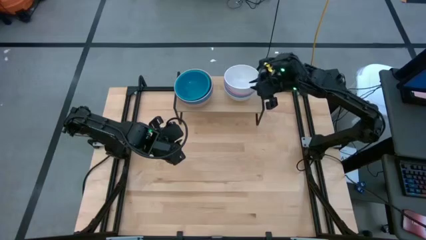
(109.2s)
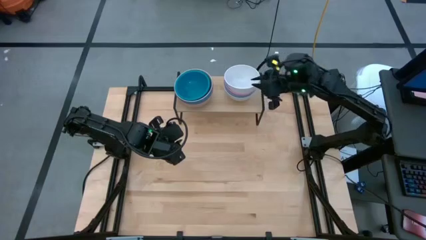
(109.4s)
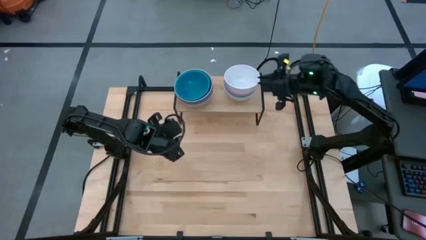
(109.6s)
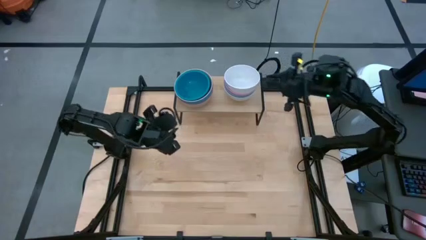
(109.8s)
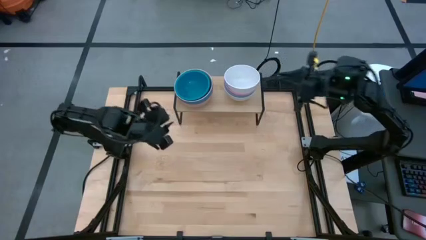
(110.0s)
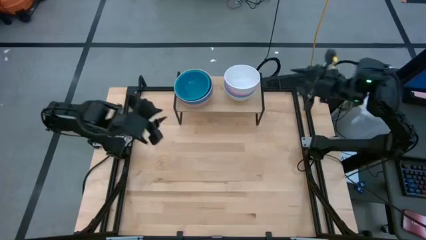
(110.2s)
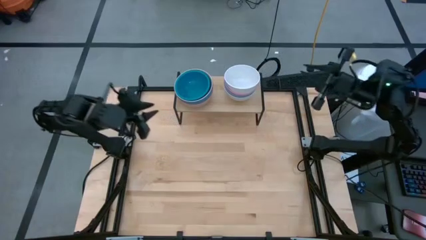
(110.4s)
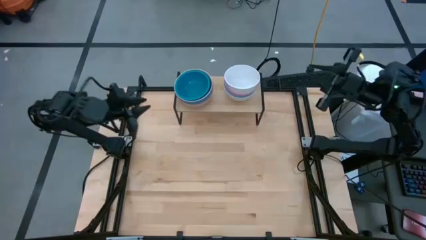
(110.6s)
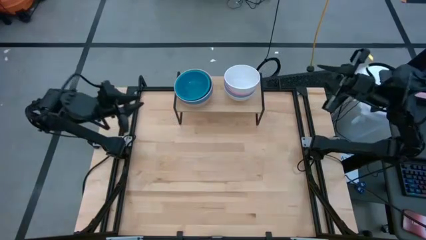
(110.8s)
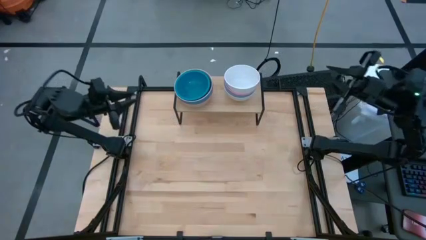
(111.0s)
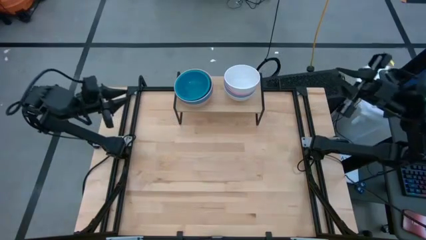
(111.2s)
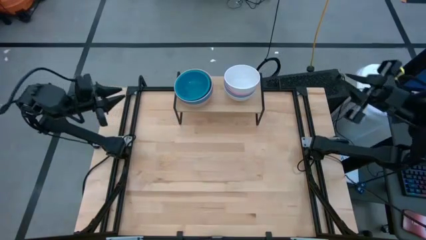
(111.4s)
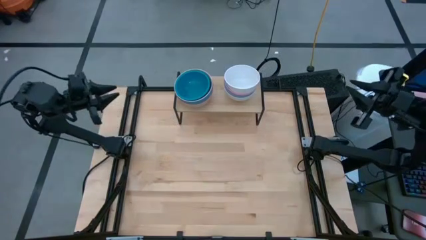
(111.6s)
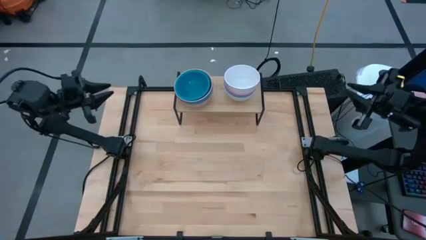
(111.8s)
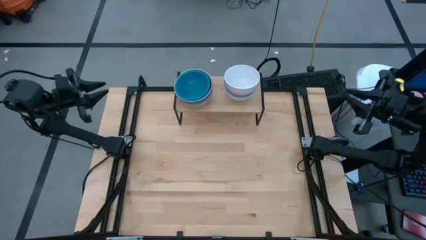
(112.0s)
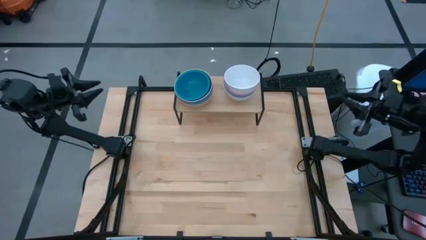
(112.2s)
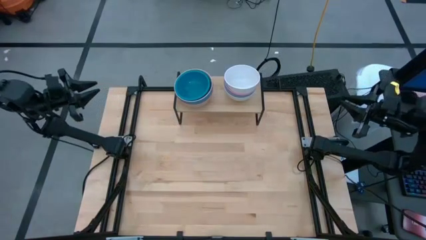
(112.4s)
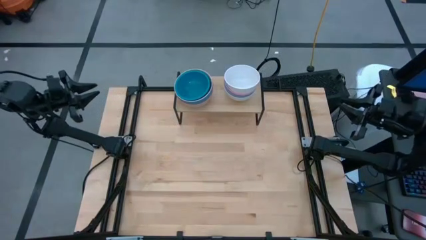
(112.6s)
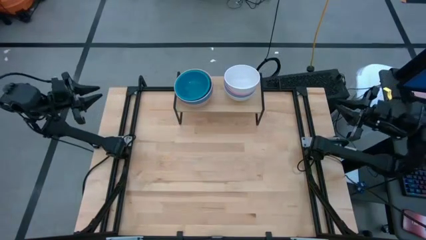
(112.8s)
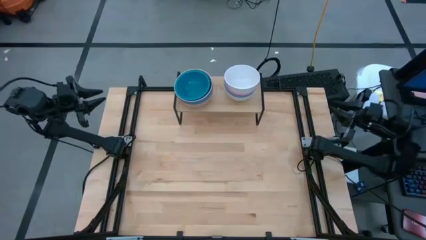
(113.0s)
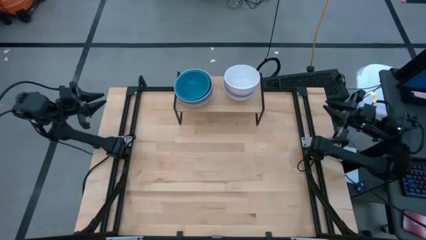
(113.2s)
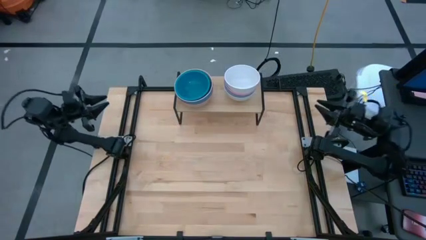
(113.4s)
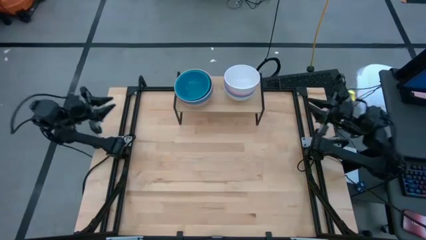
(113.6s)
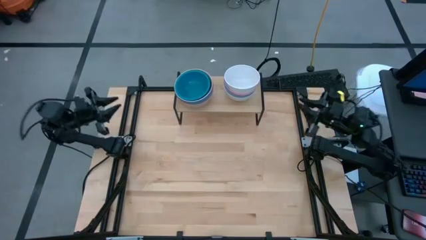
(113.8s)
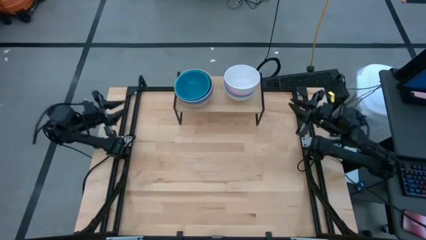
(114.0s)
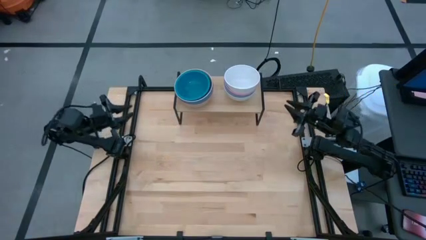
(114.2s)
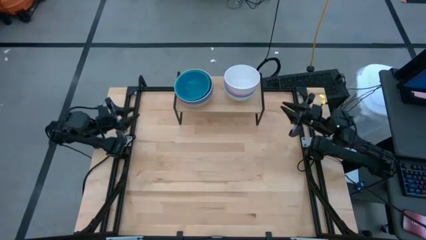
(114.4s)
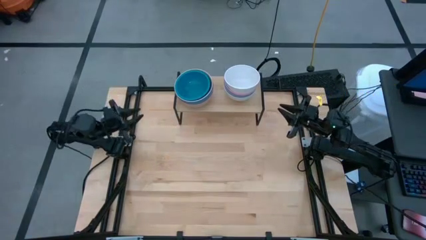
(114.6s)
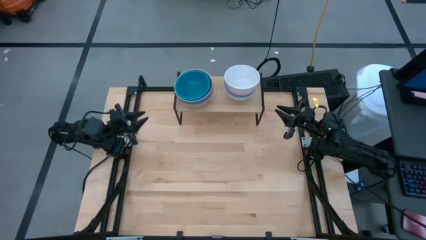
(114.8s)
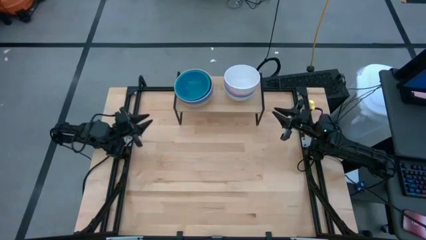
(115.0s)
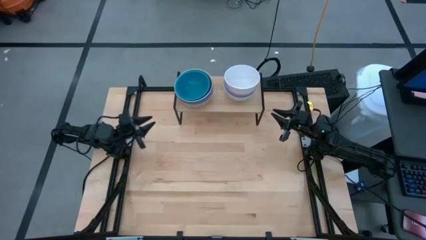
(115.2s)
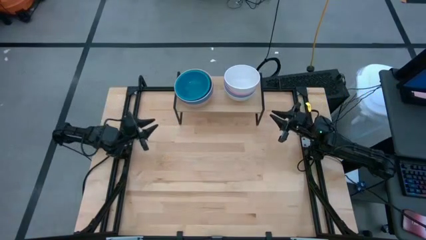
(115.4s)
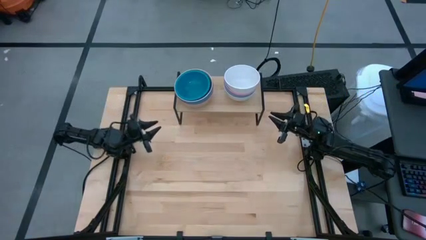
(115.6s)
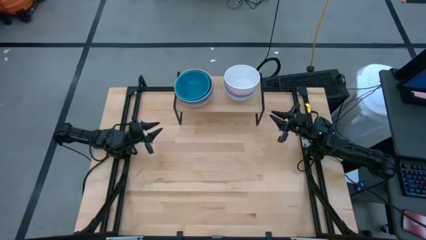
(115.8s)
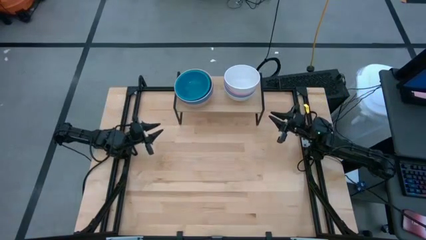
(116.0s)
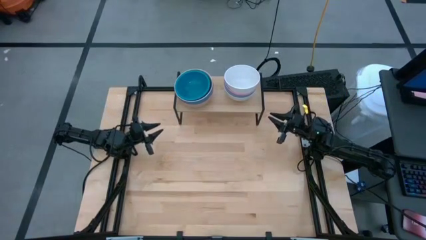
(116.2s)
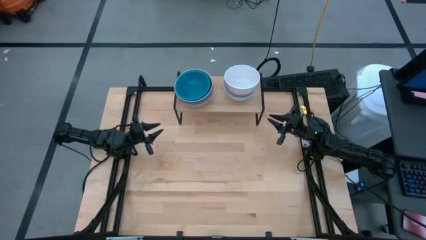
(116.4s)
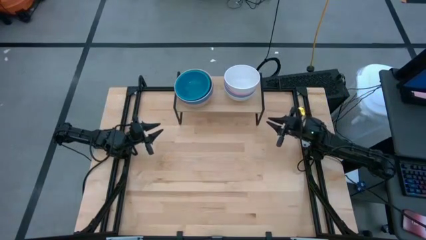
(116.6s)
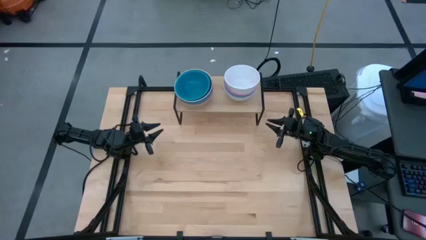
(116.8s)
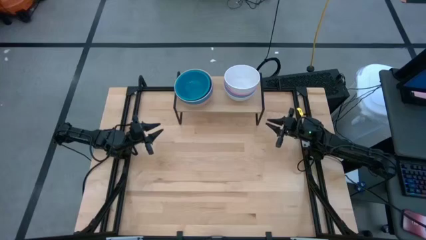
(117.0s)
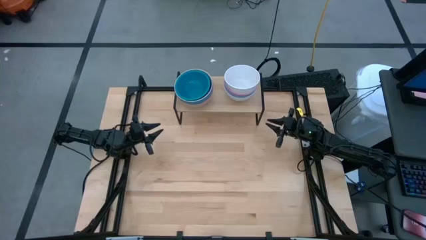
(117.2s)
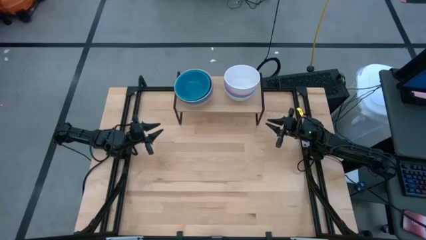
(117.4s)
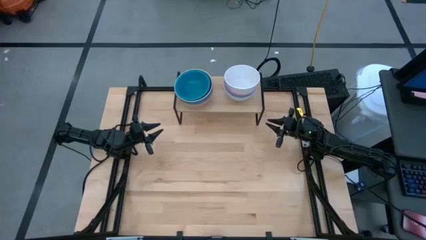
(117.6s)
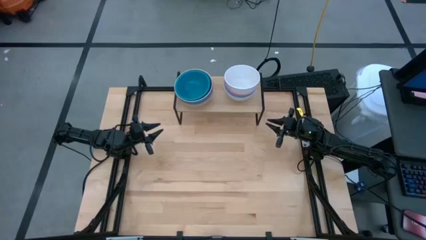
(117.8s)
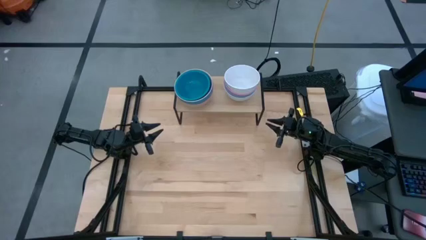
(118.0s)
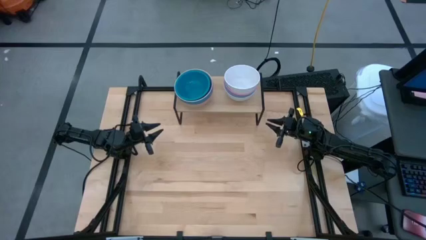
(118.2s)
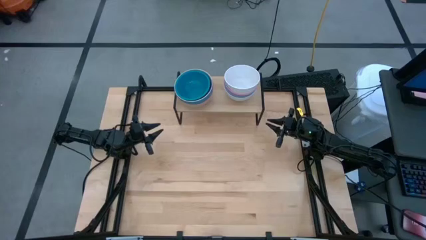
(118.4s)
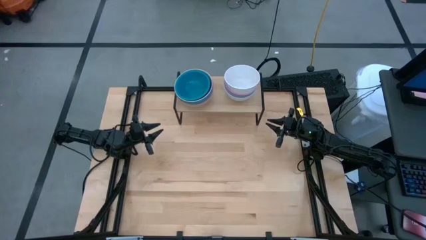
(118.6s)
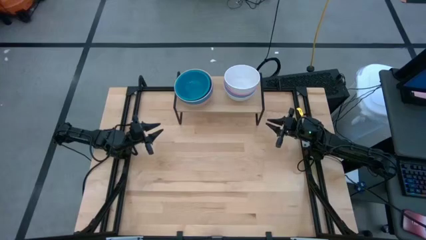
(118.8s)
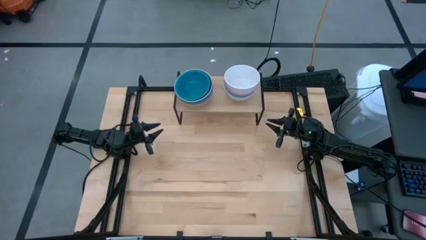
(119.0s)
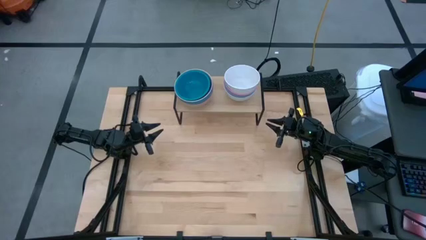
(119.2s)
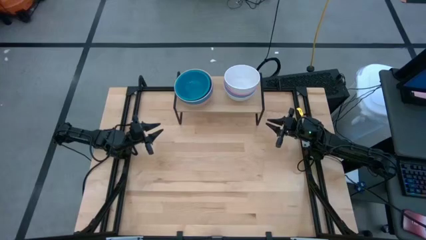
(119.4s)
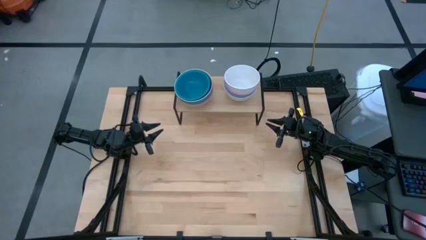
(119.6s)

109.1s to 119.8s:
Task: Place and stack bowls onto a shelf
Return to Home Position

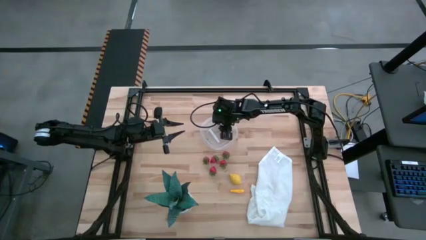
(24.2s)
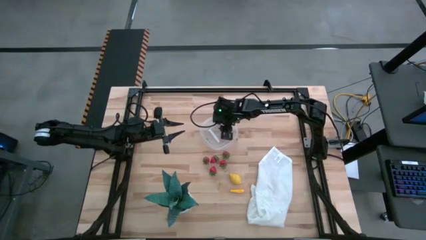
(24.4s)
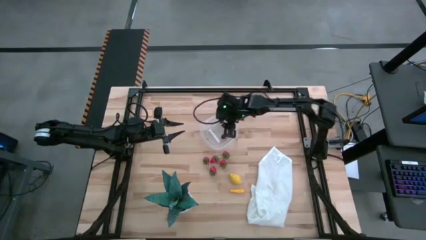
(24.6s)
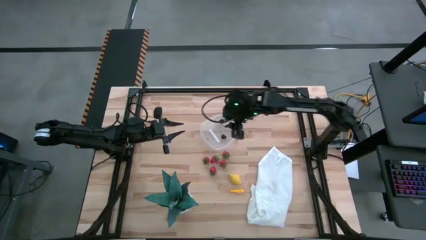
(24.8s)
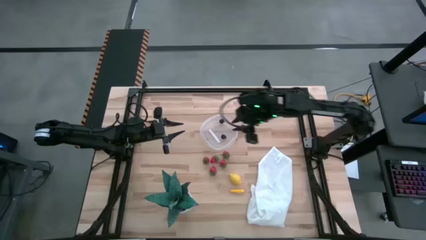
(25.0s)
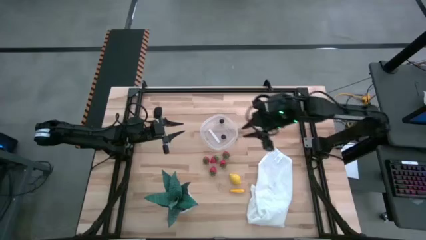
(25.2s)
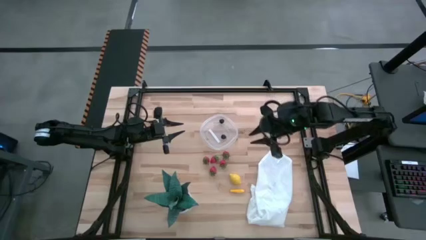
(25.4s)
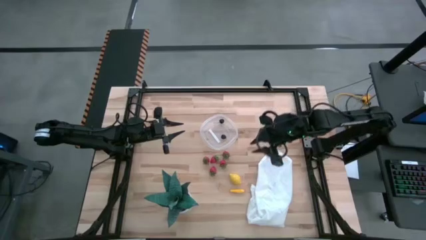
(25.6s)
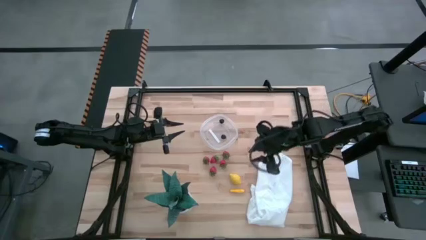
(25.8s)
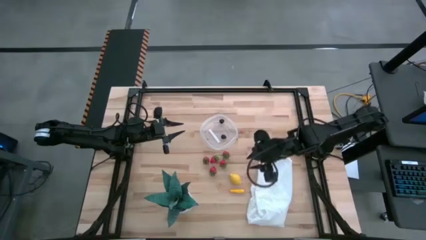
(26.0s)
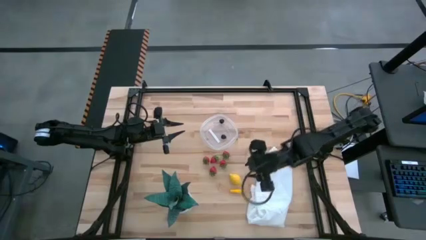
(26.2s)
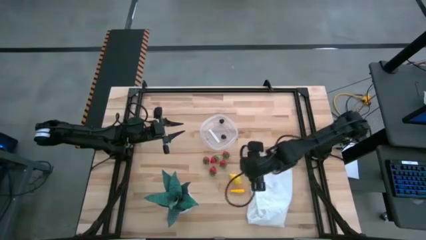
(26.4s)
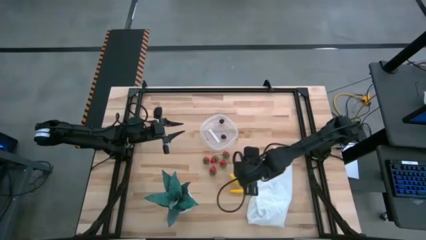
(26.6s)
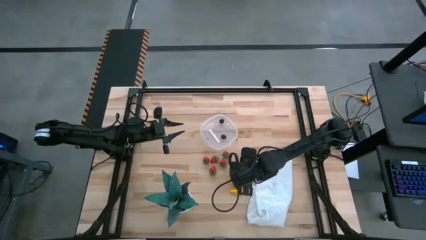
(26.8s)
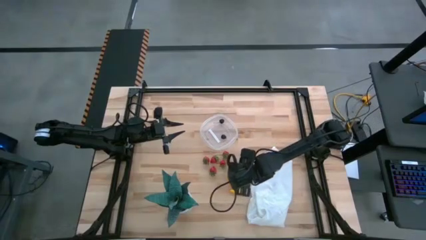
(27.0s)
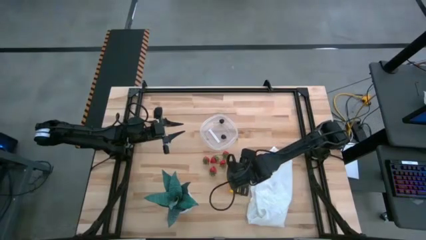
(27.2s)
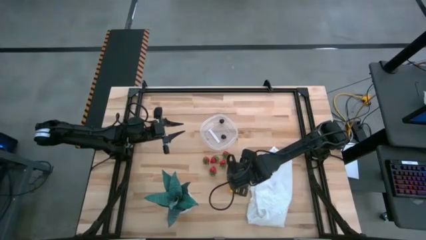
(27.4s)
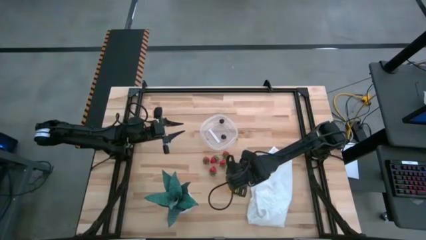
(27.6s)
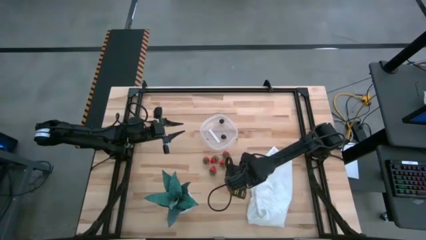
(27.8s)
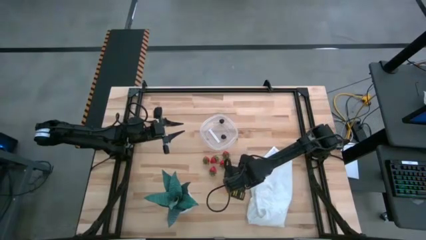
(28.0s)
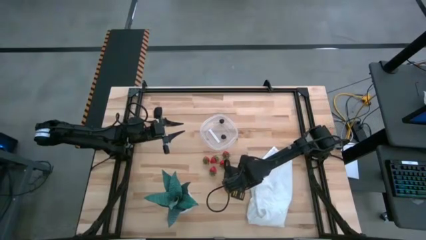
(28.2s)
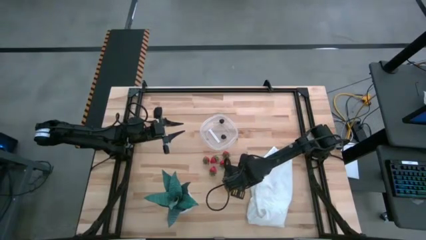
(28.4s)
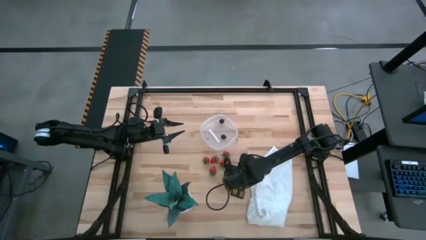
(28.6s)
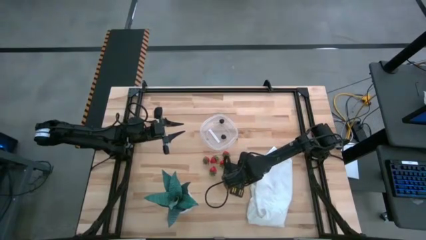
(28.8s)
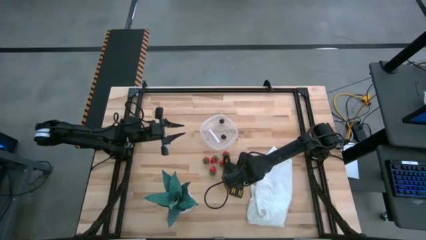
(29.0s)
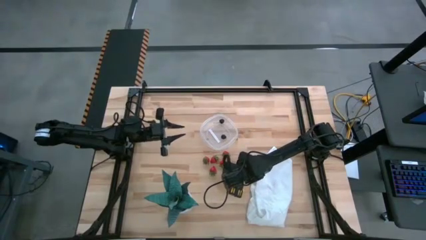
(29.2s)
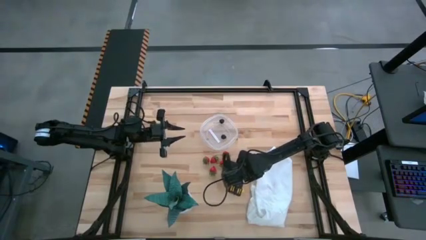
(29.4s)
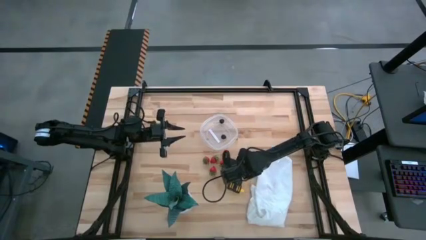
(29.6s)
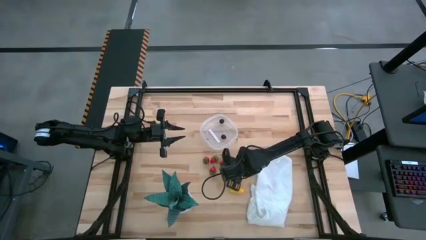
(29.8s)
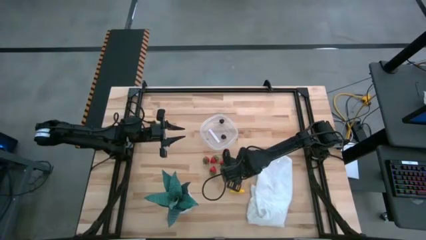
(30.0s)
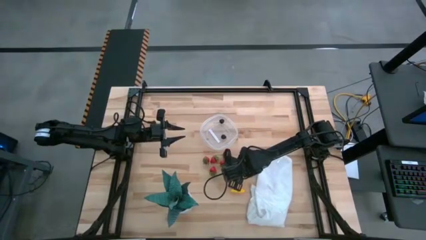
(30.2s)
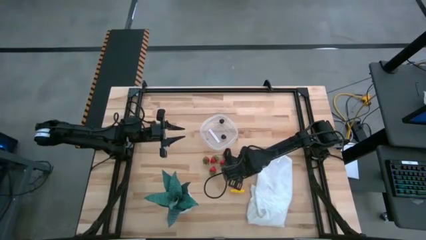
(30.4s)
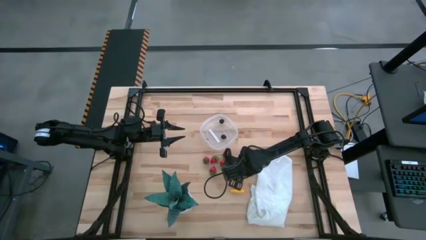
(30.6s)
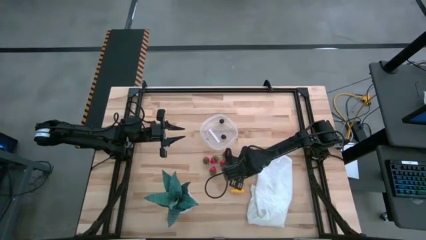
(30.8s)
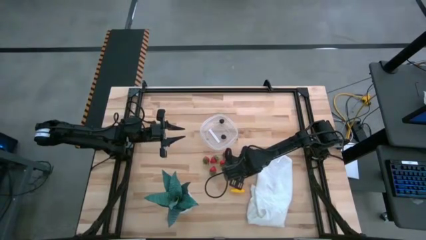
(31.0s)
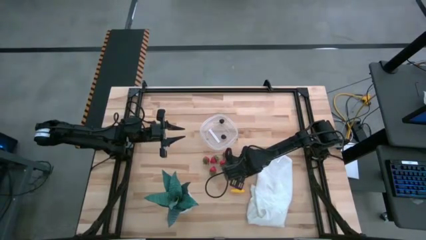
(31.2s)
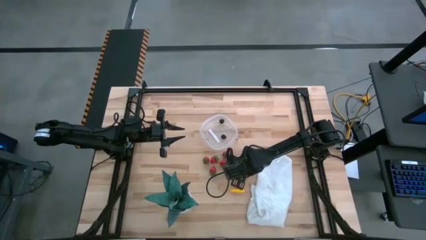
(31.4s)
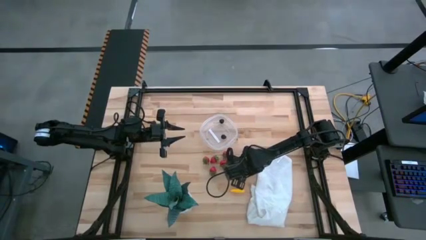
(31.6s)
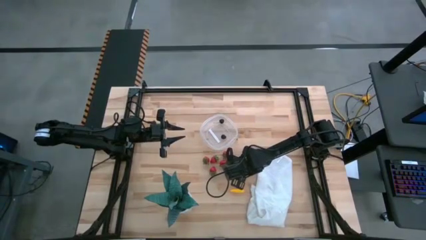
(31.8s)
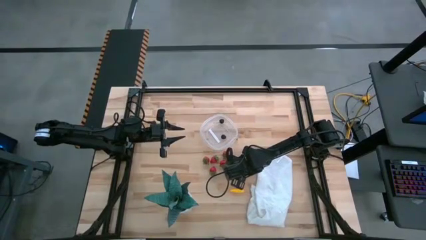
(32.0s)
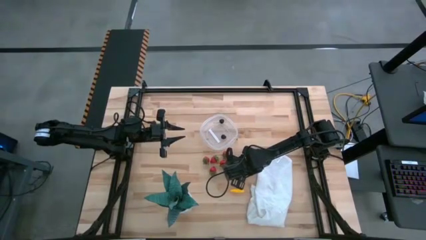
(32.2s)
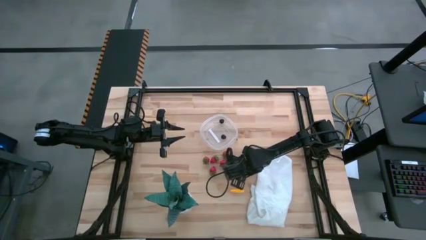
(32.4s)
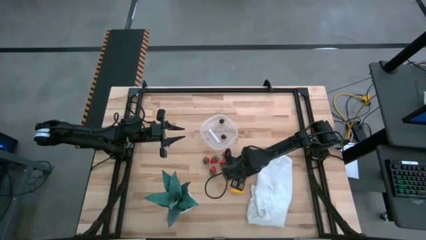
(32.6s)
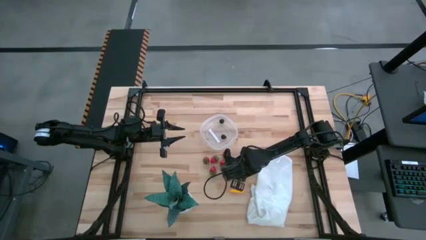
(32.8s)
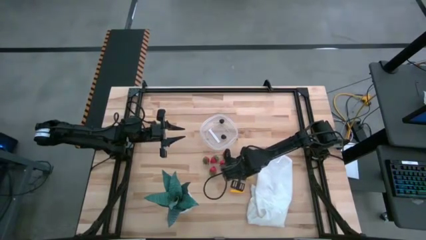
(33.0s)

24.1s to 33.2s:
Task: Pick and placing Produce into tupperware
Put the lemon into the bin
